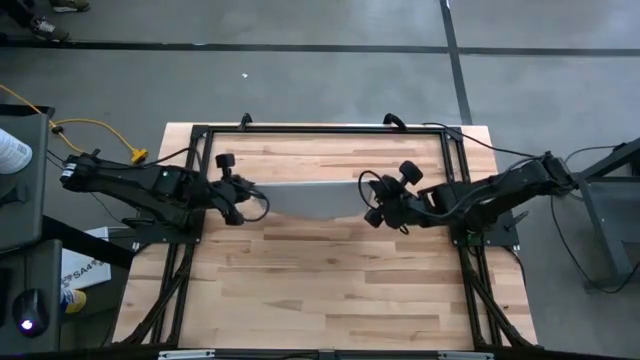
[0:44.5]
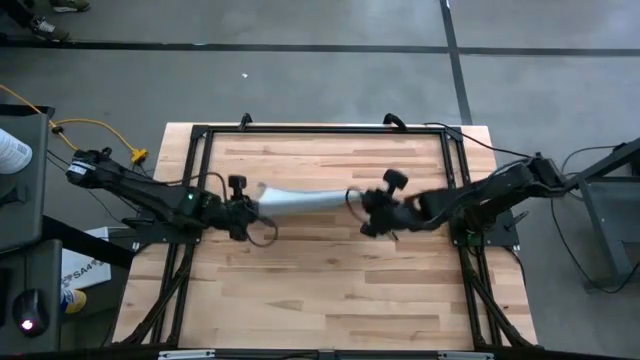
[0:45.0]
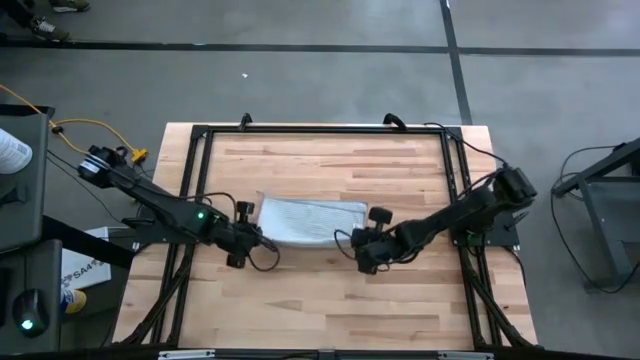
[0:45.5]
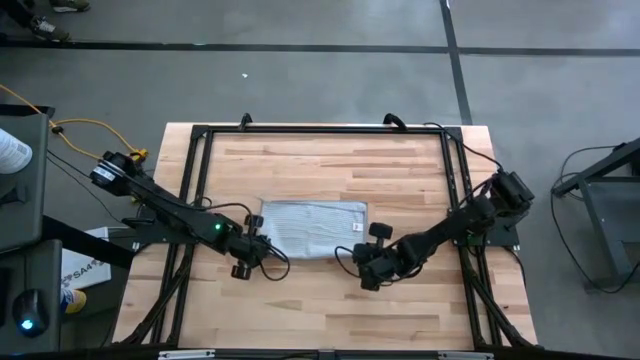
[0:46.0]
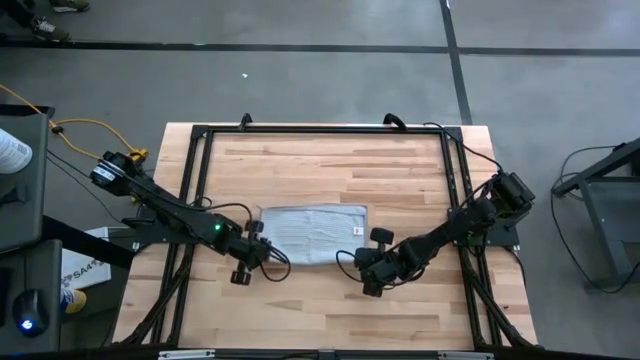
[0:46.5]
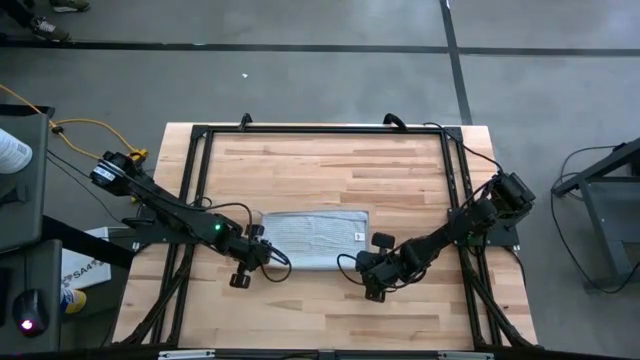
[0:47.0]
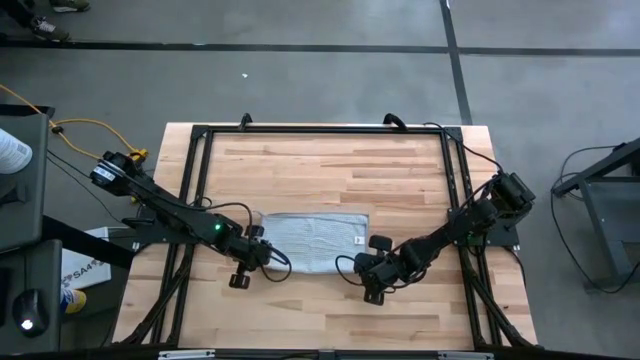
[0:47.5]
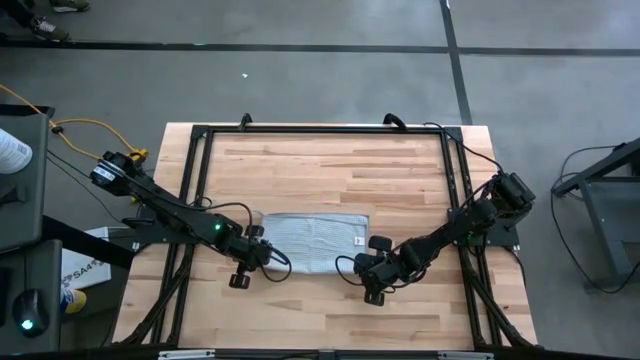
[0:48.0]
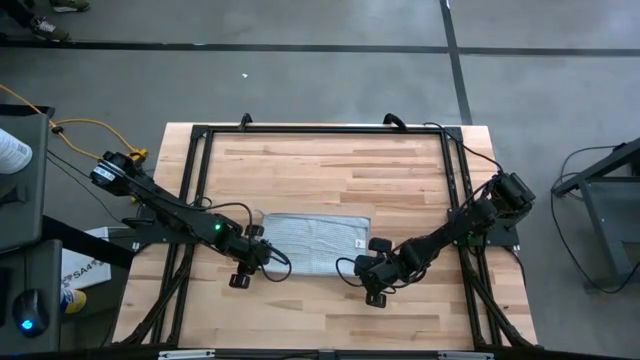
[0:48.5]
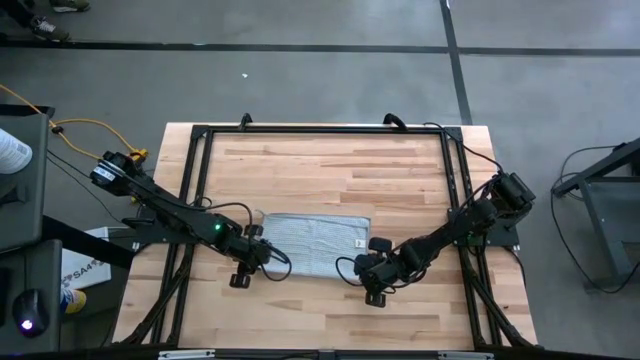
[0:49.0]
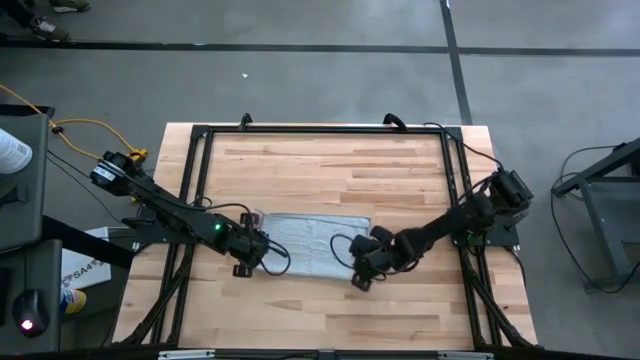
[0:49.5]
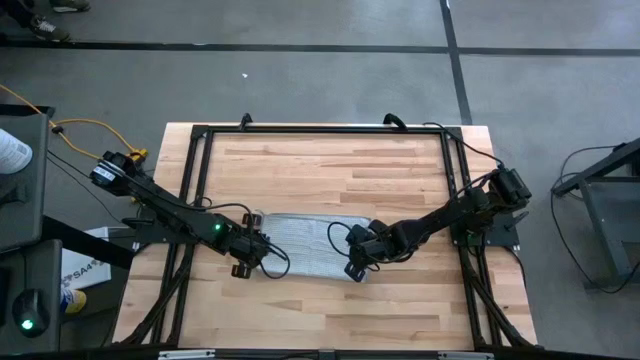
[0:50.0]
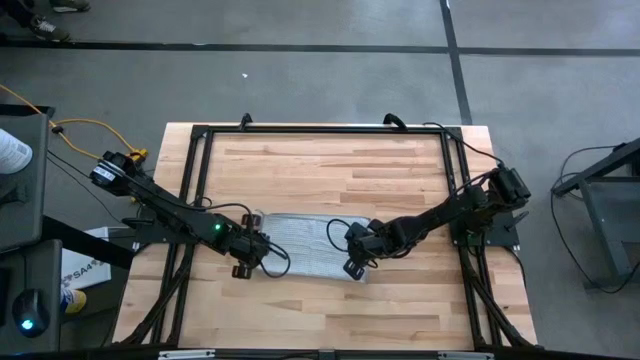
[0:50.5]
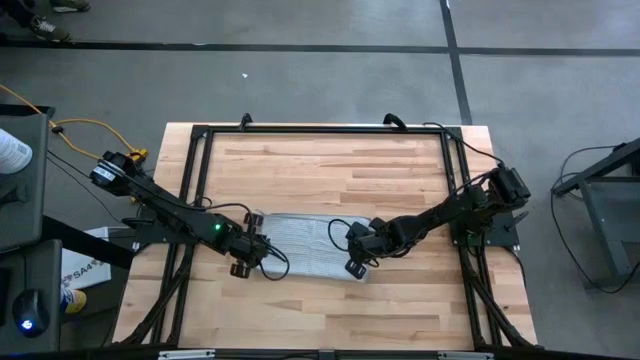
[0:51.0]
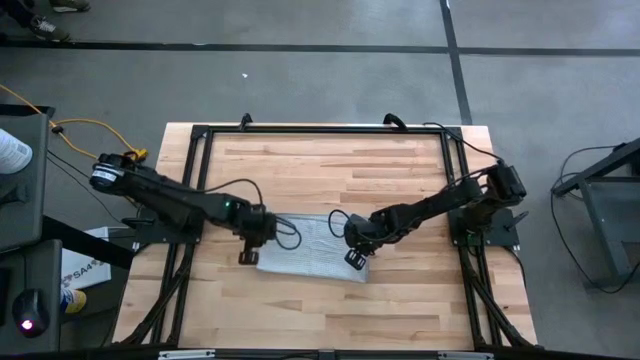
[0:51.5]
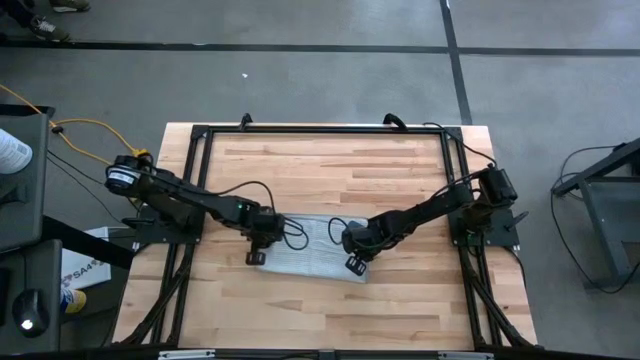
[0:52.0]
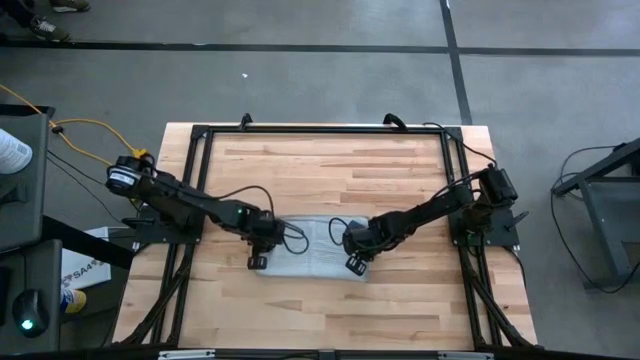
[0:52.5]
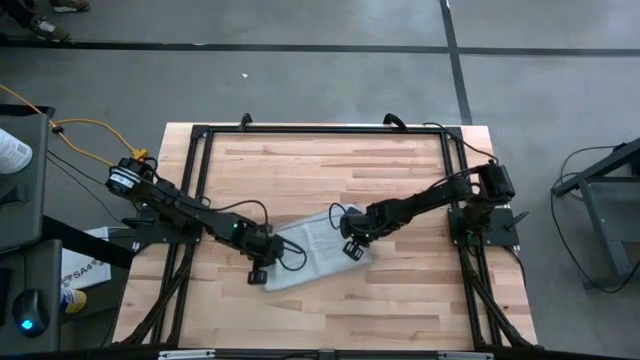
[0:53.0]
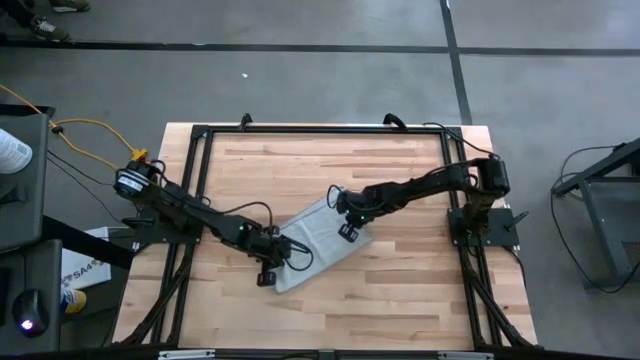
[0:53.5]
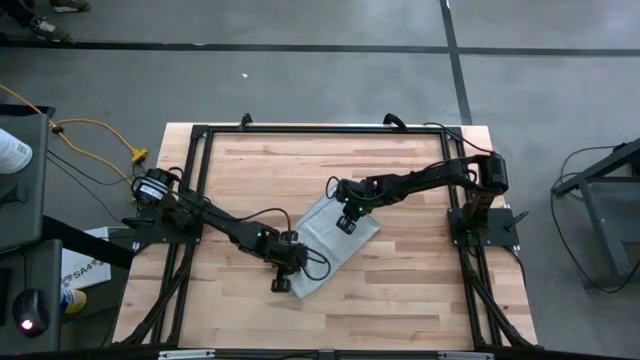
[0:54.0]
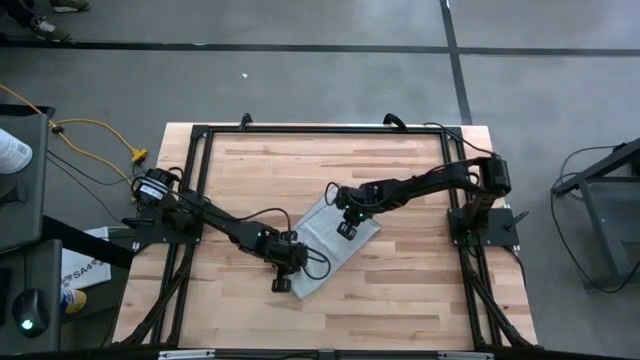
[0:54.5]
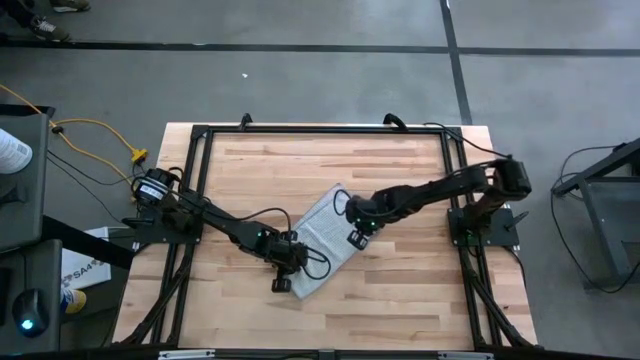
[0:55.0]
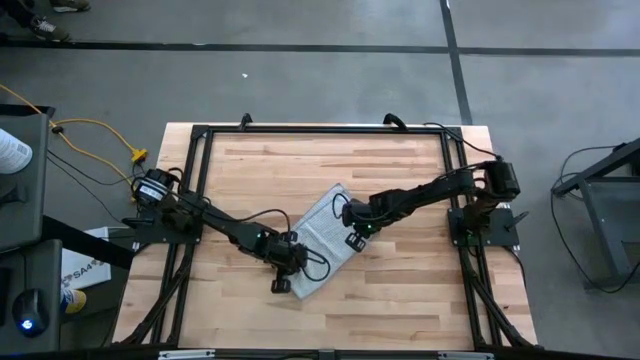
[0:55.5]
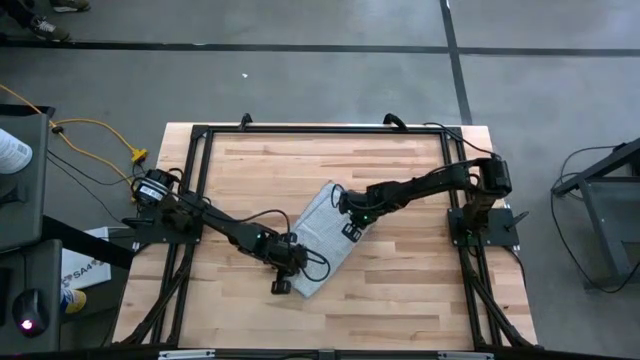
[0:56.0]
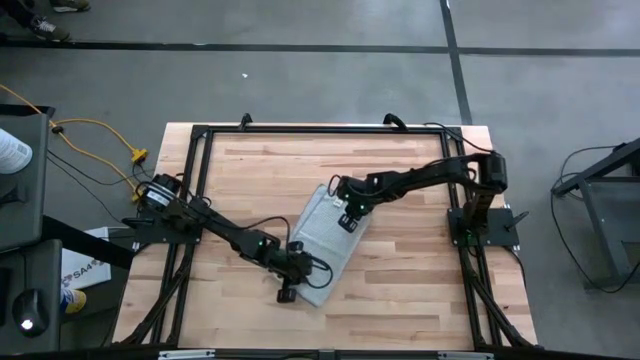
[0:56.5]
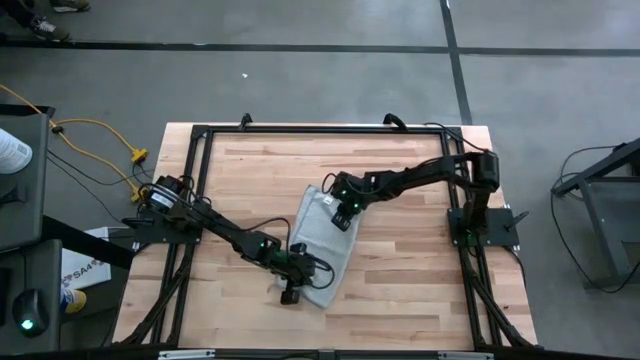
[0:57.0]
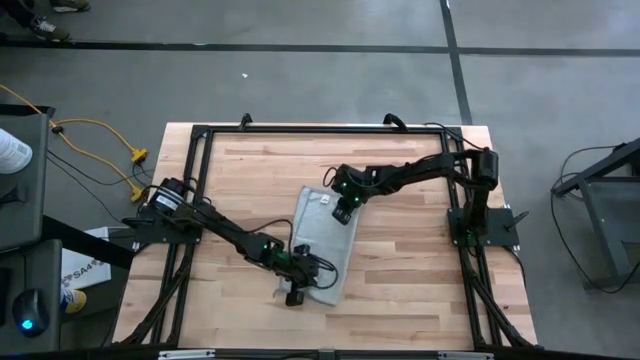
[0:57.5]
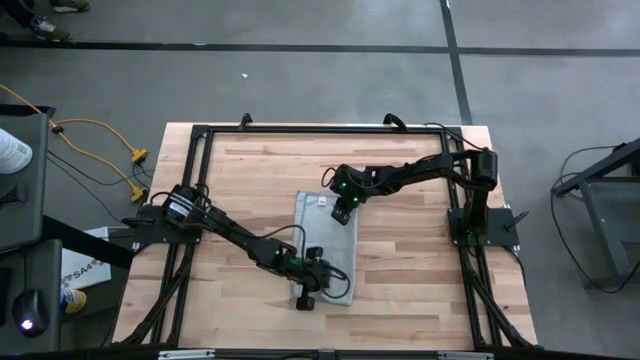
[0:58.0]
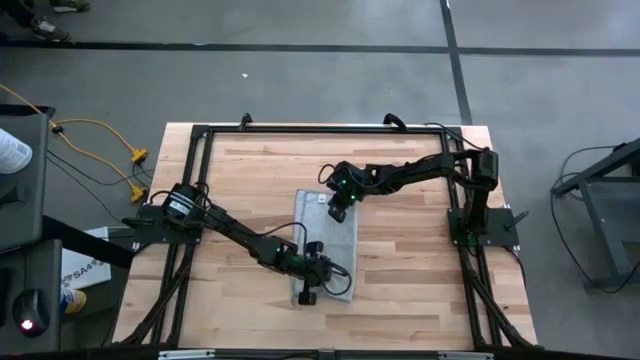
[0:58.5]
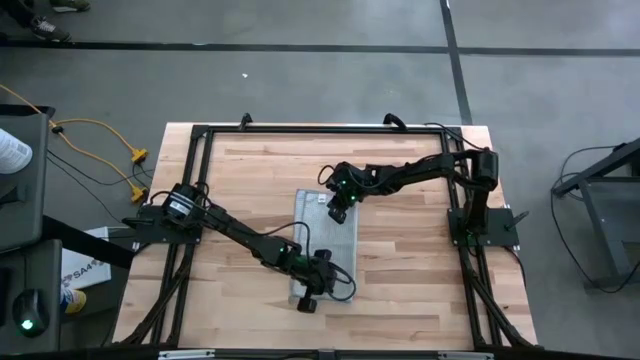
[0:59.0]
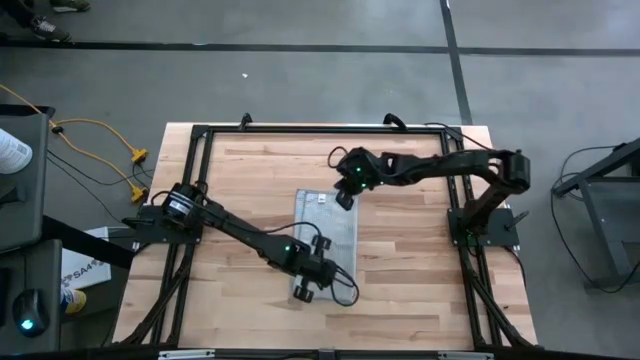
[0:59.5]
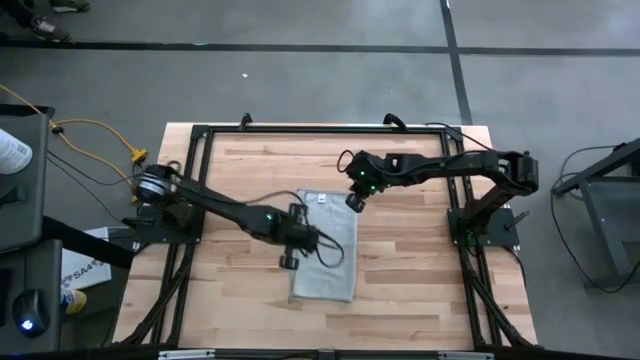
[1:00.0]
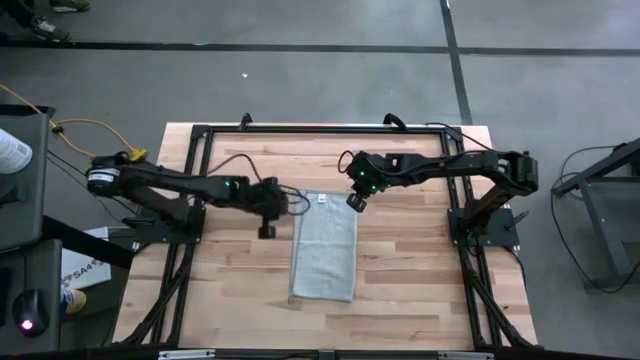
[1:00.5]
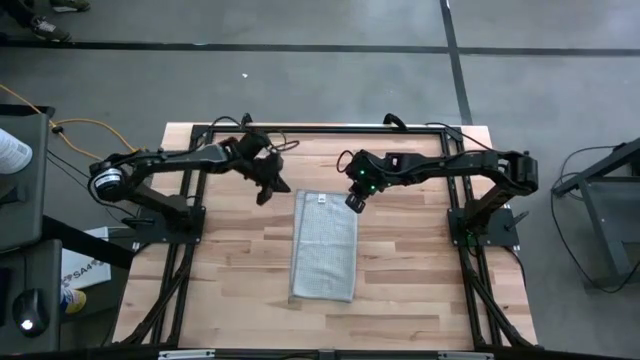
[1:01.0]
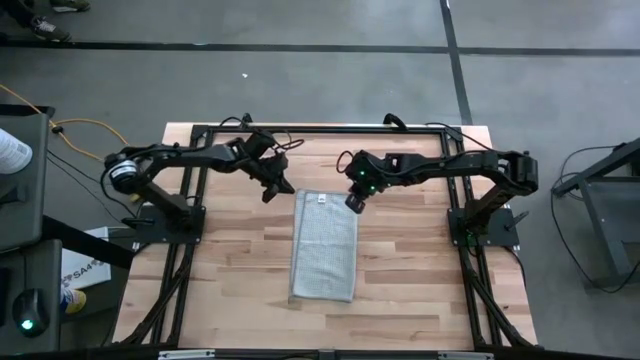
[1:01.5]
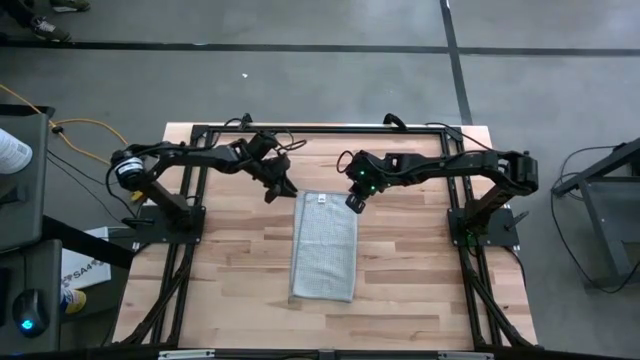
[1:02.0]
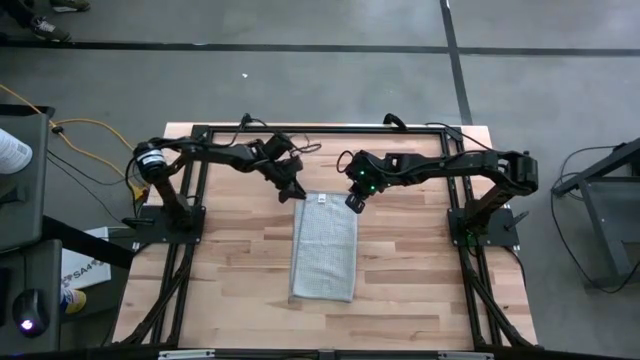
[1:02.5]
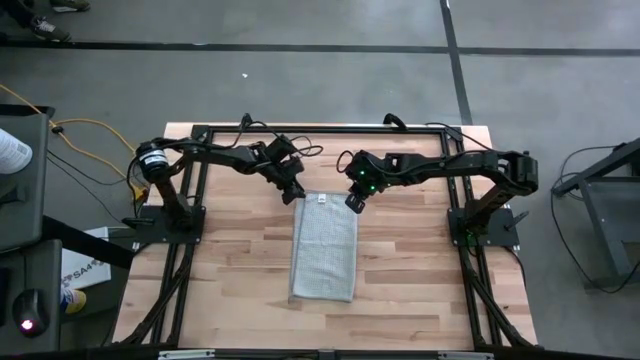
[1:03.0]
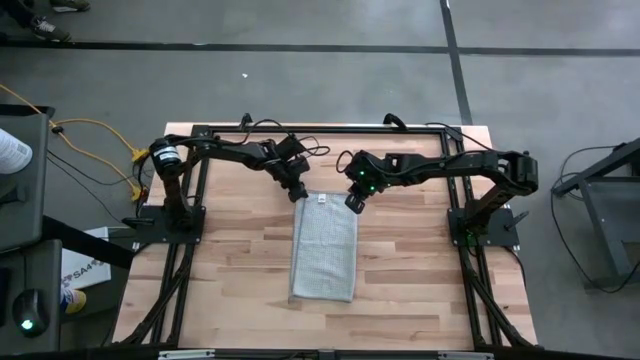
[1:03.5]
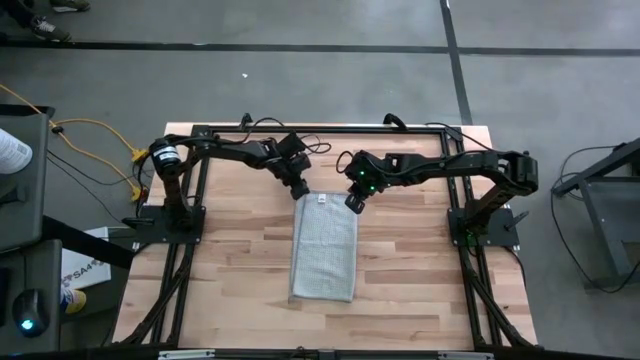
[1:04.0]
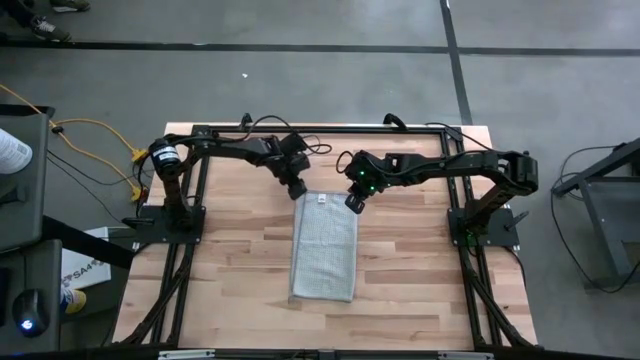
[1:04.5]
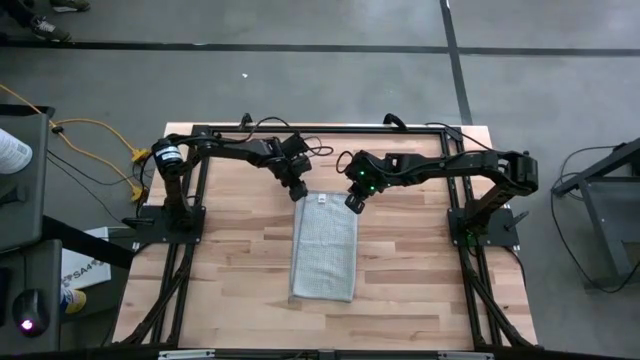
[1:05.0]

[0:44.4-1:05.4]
Task: Fold microfiber towels
Fold the gray towel
